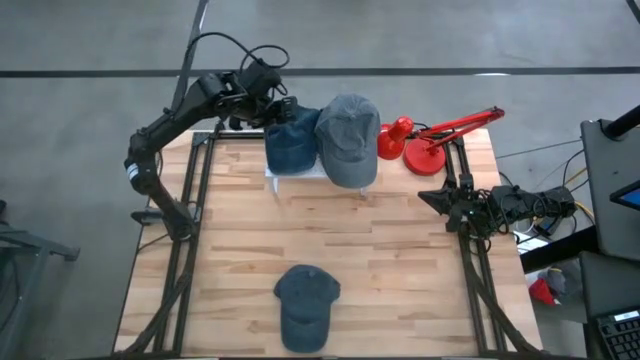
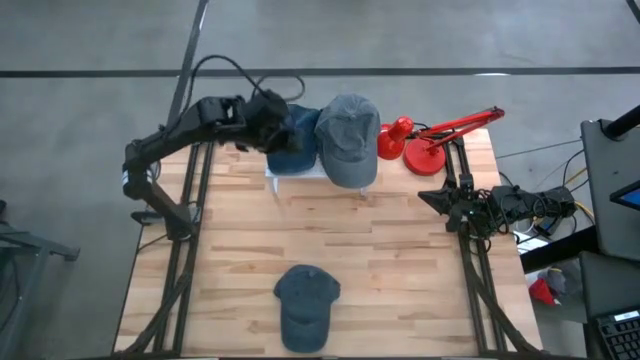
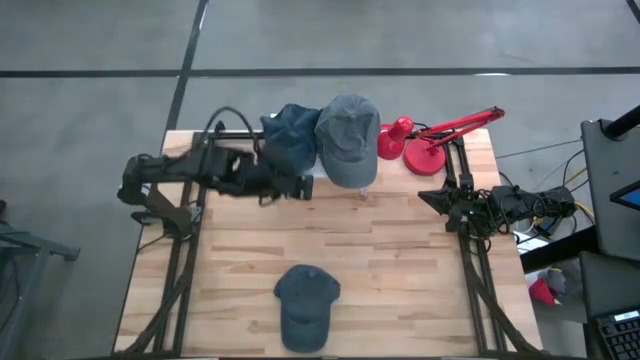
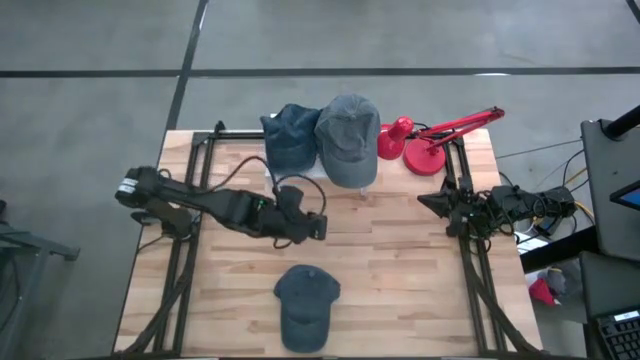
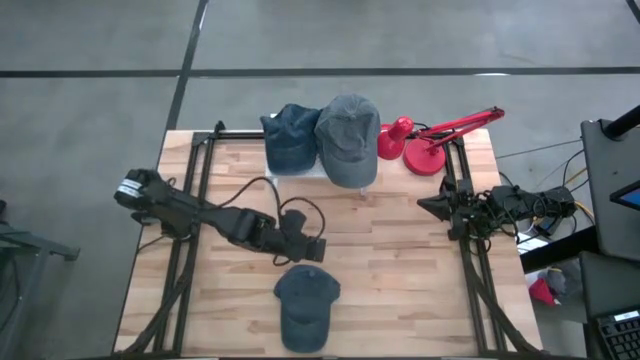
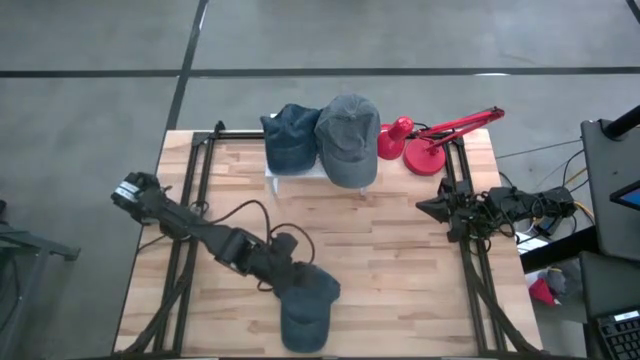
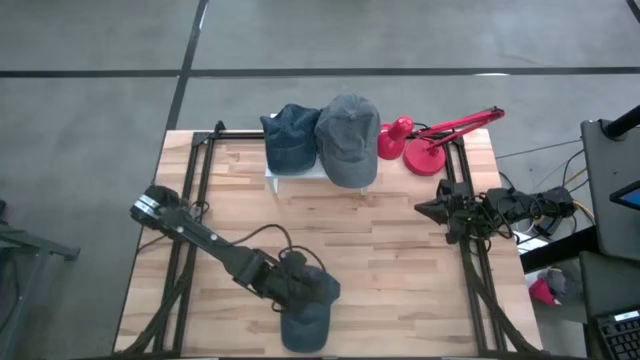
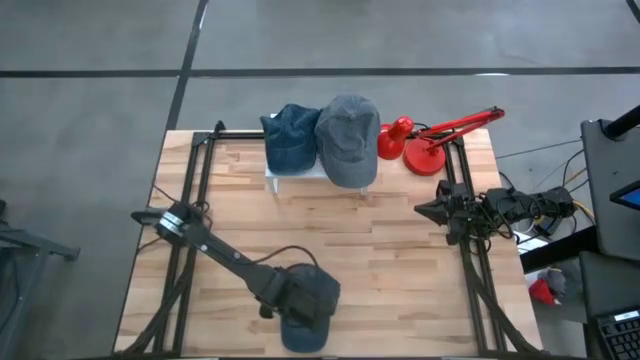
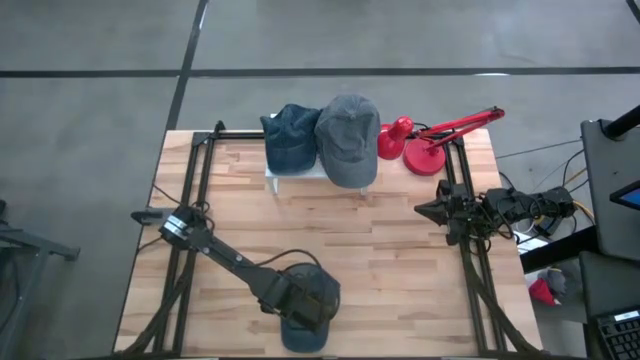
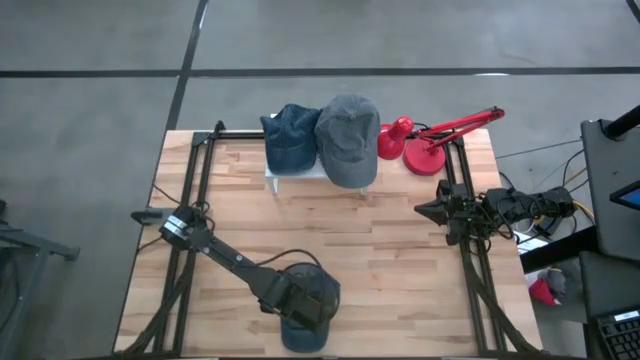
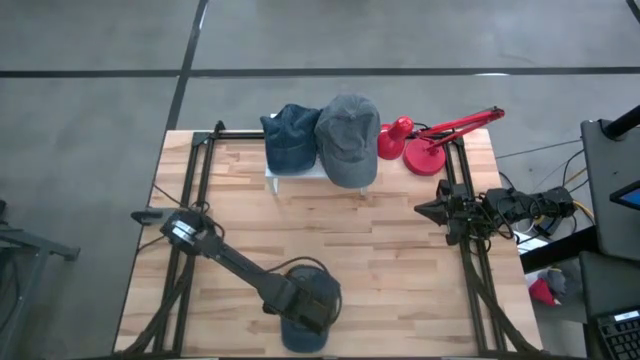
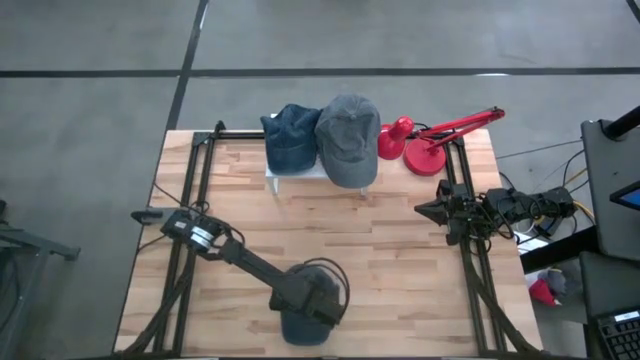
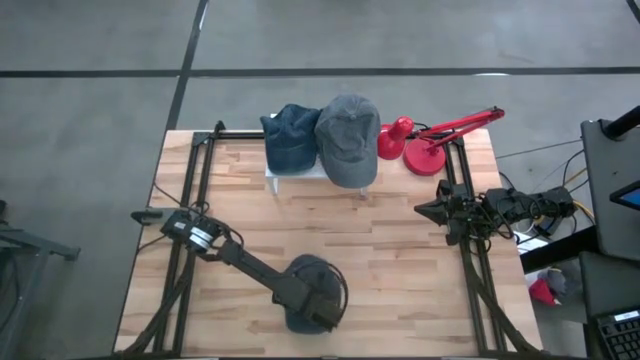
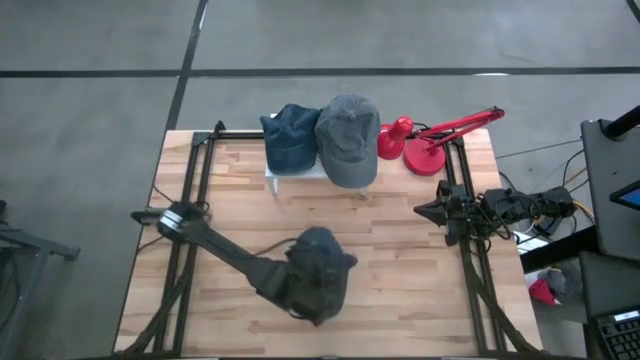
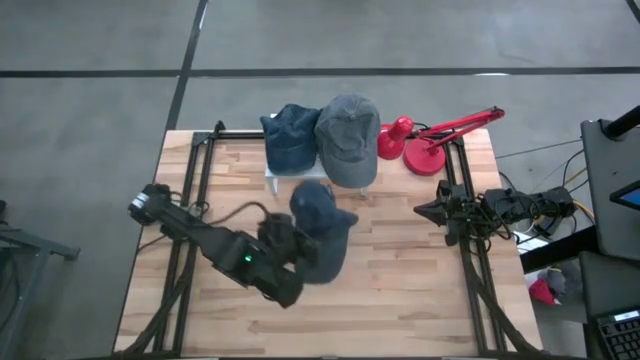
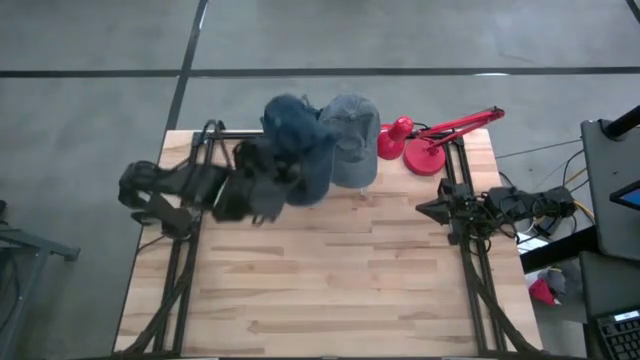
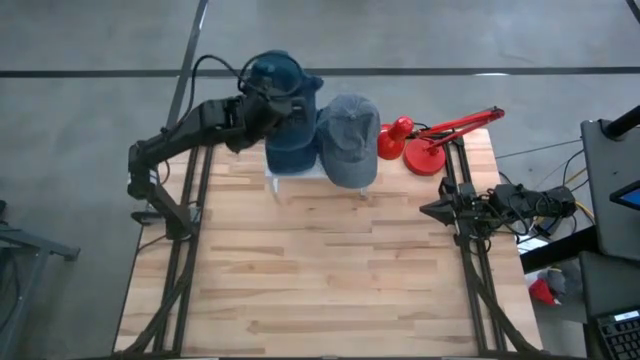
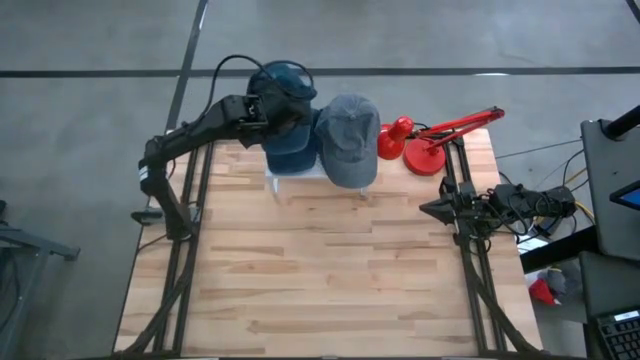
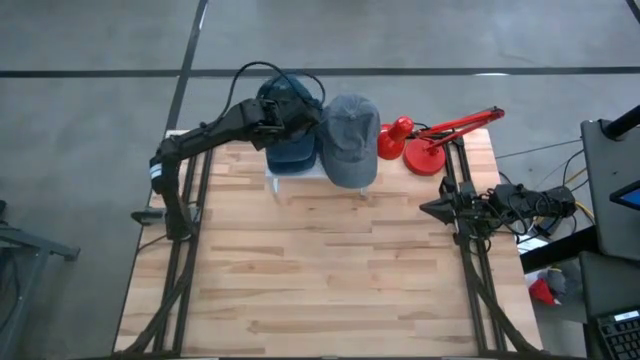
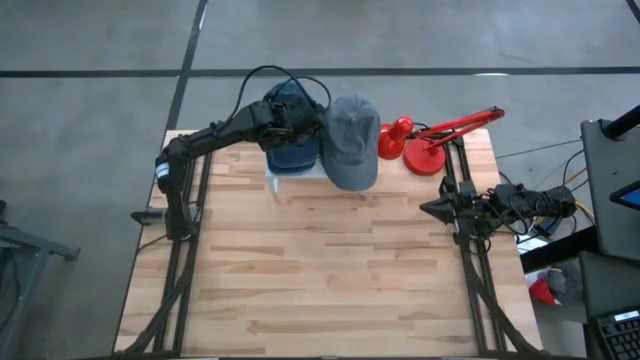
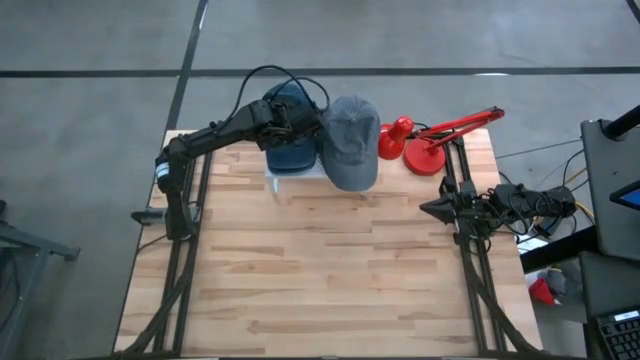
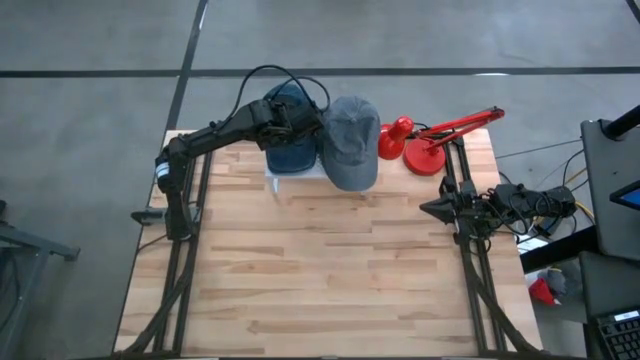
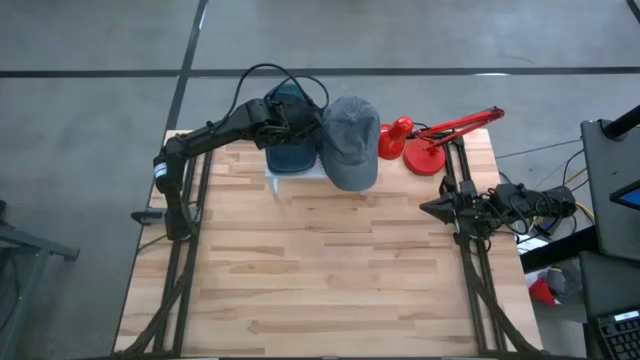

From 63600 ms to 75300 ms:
Task: Pick & Place hat
Stack the blue cap on the blue caps on the shelf

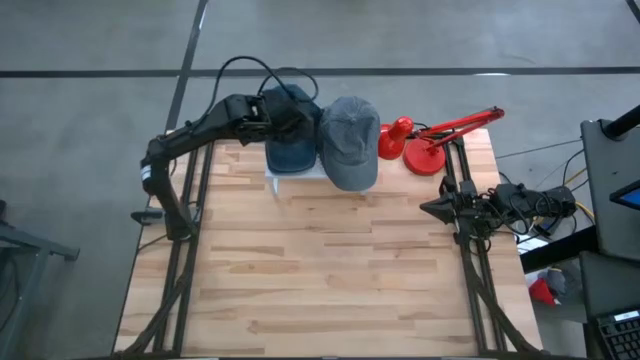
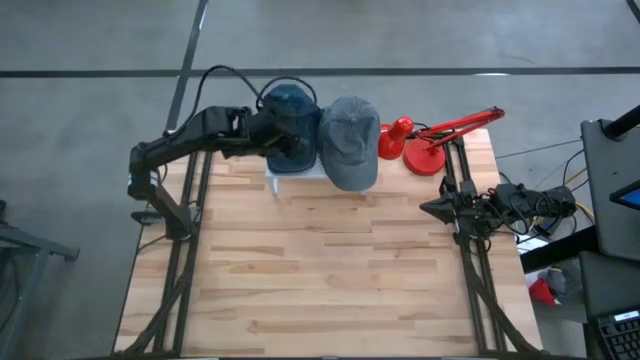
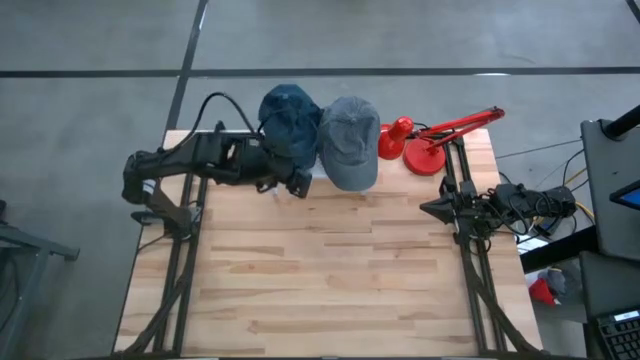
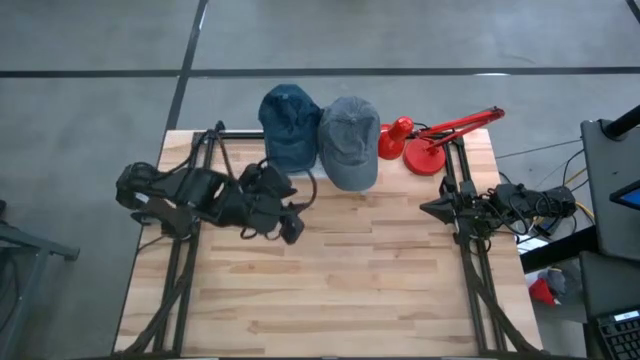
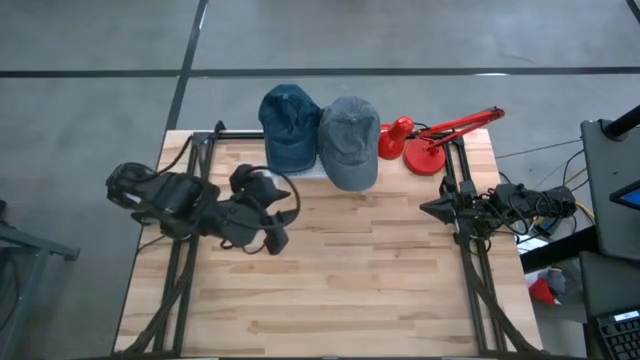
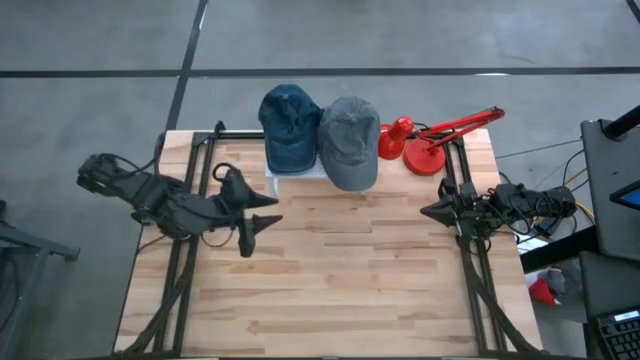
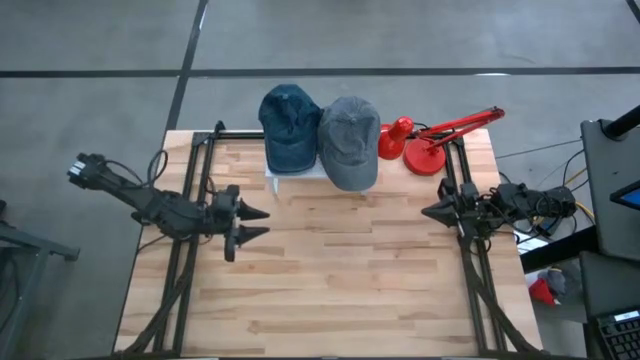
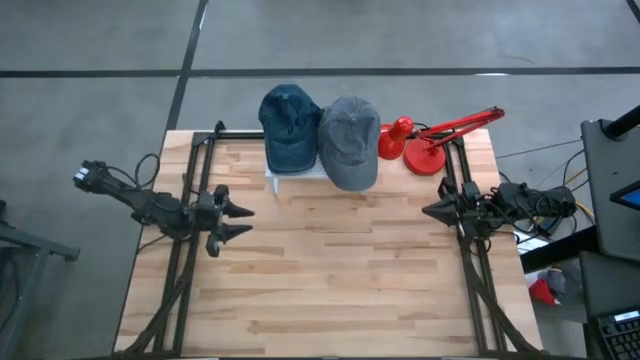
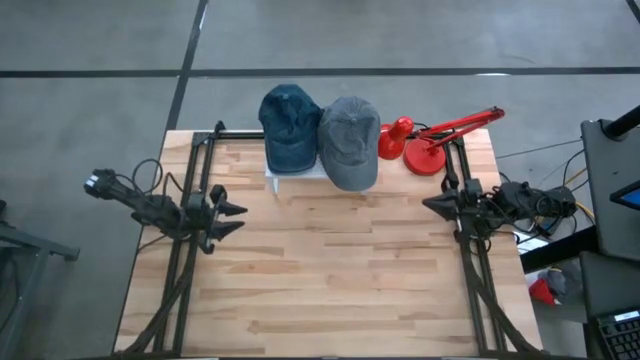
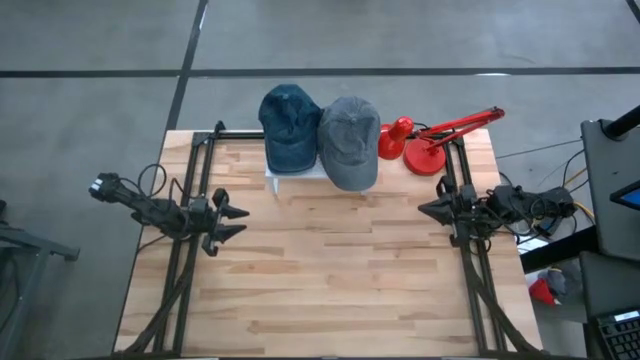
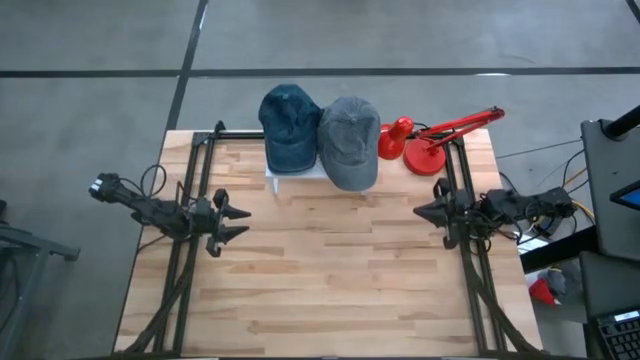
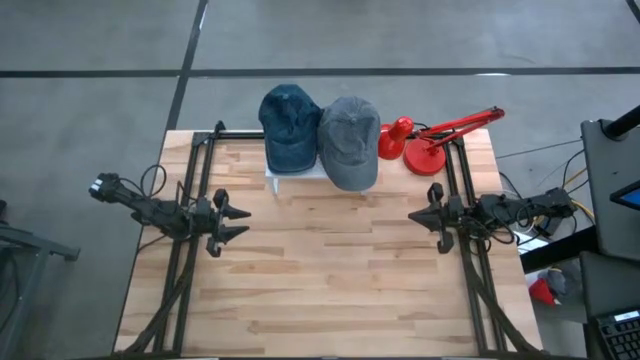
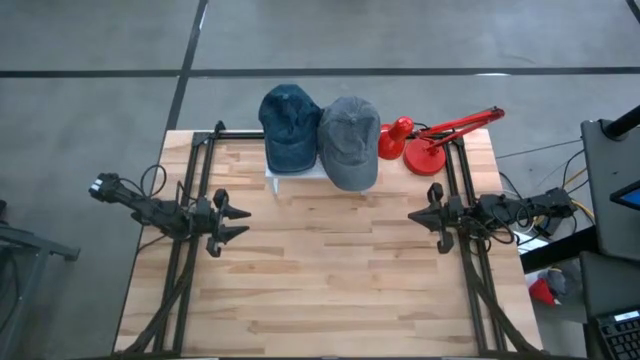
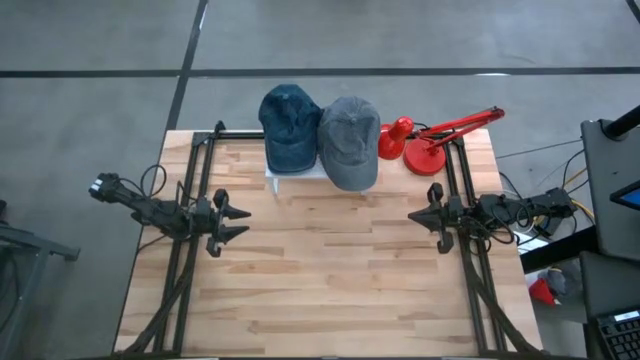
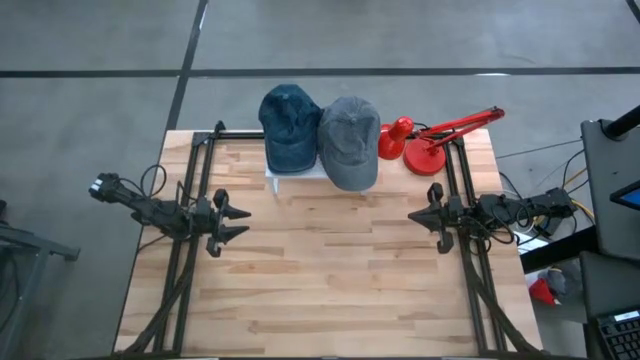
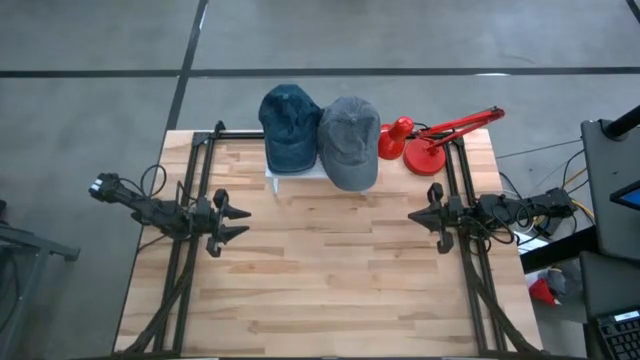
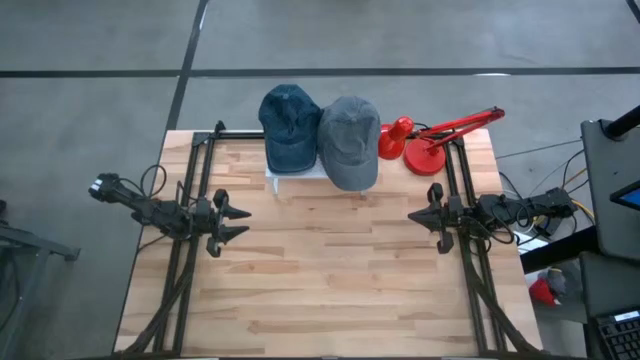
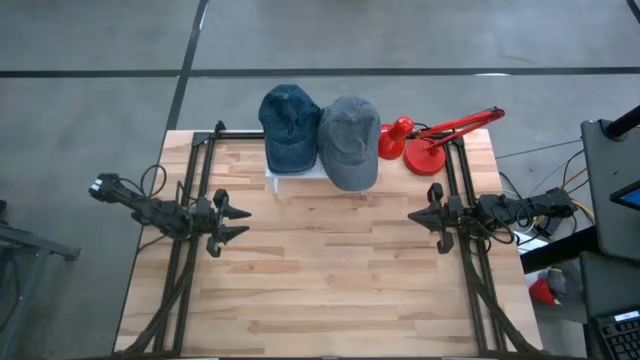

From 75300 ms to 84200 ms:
Return to Home Position
